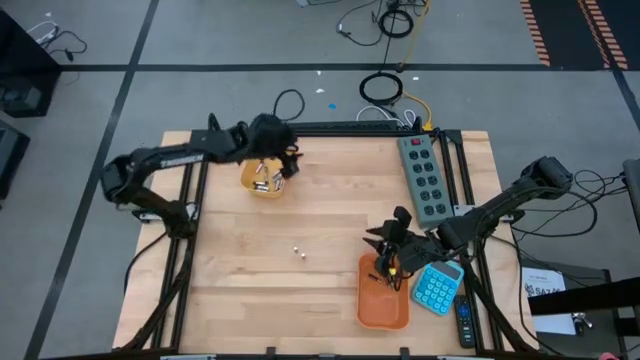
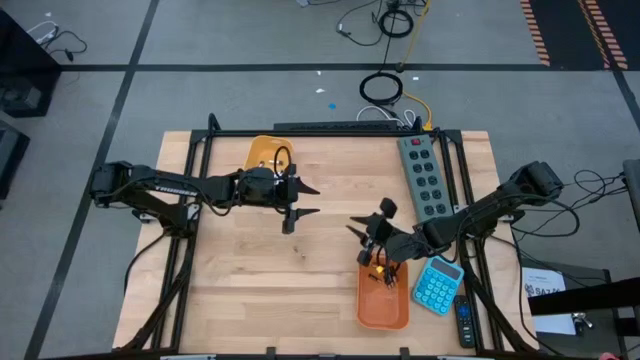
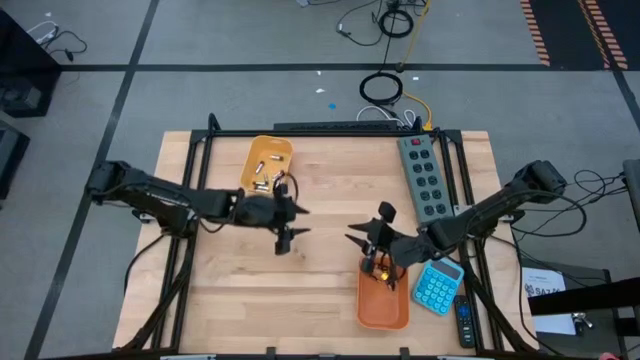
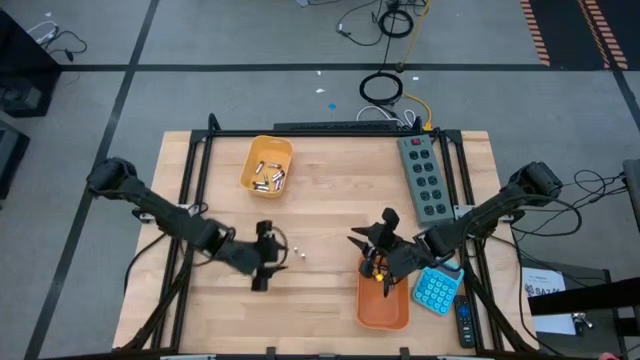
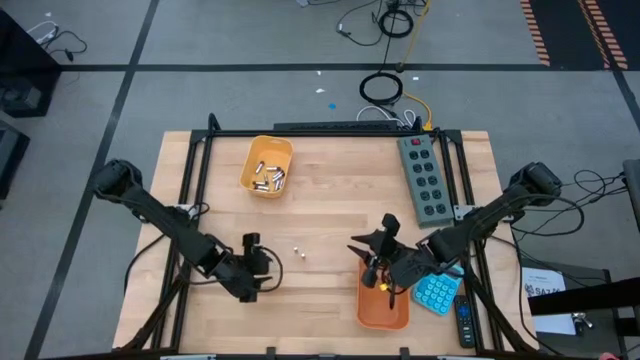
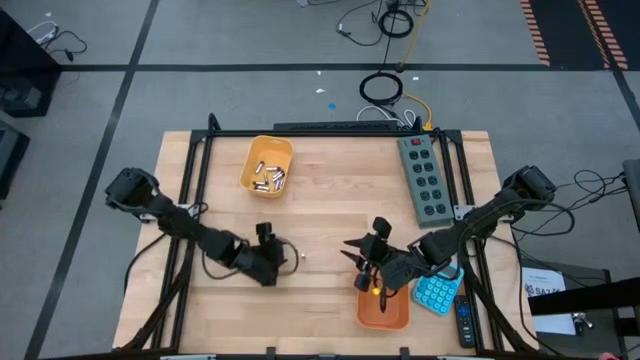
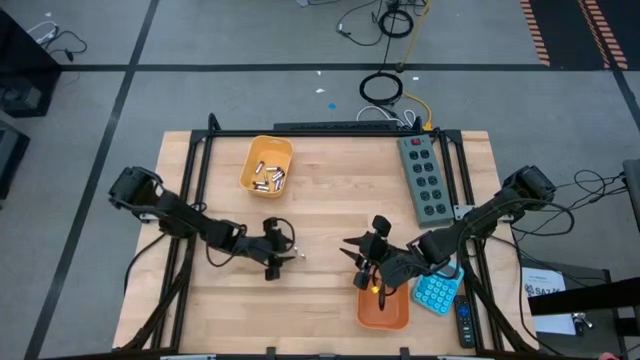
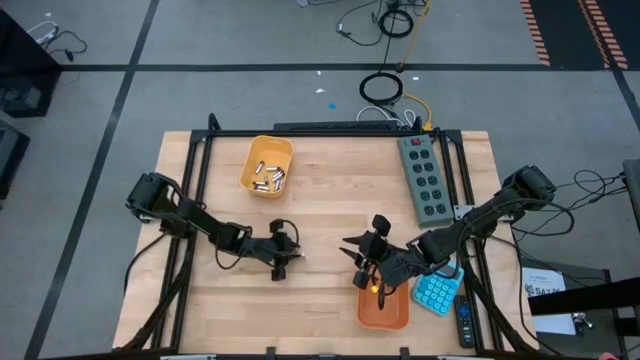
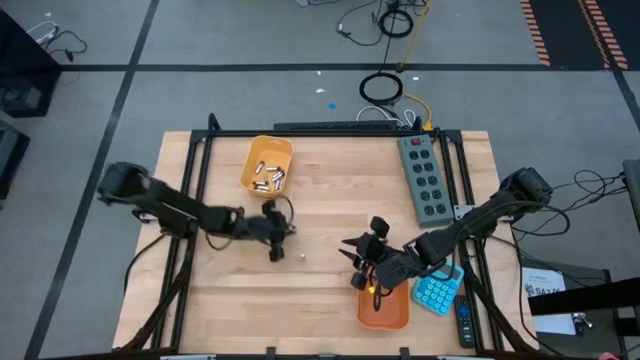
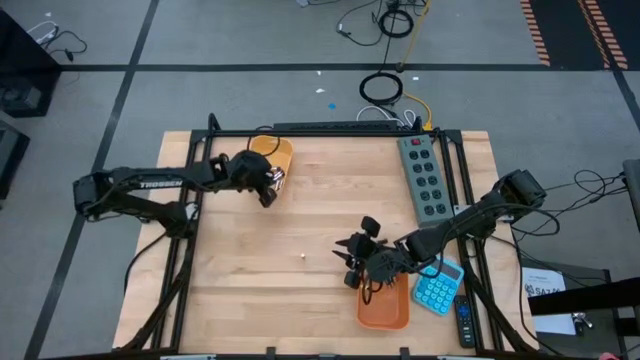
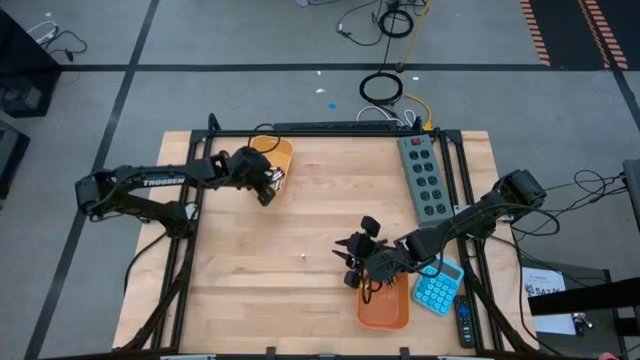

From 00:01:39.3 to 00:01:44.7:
Task: Sort batteries
Put the silver battery into the yellow bin

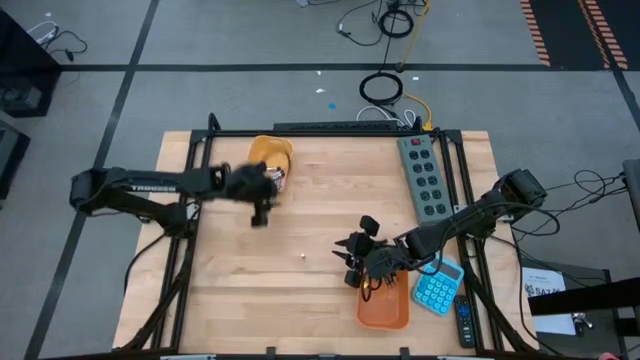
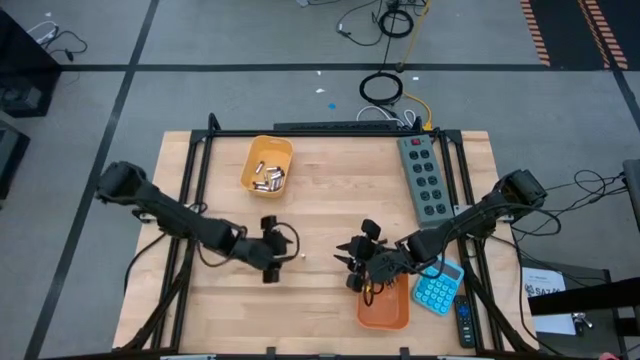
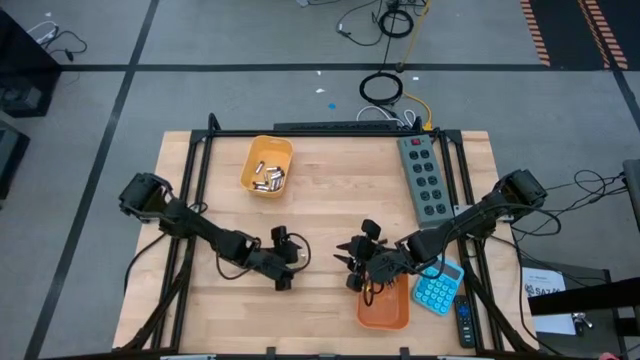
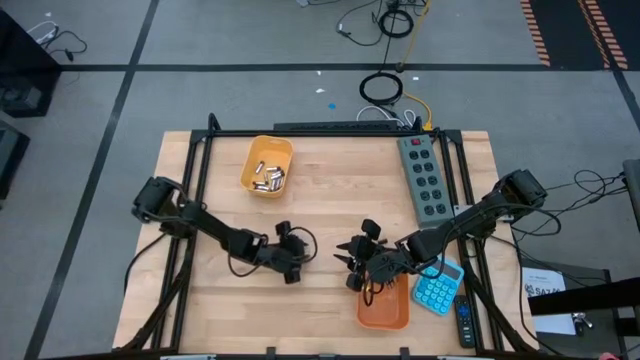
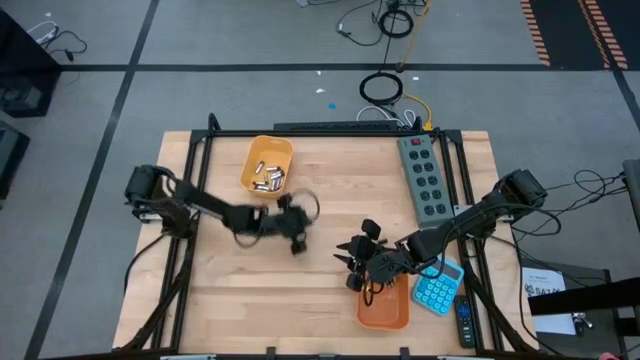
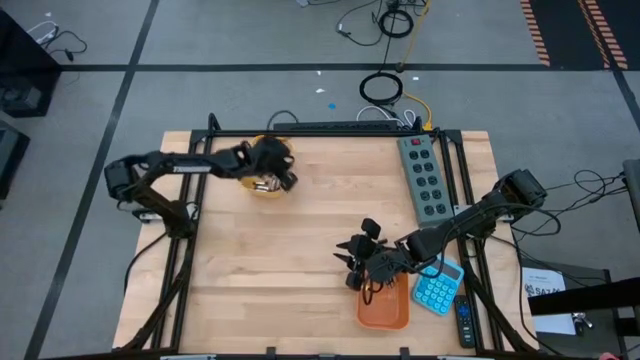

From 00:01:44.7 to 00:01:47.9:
Put the silver battery into the yellow bin

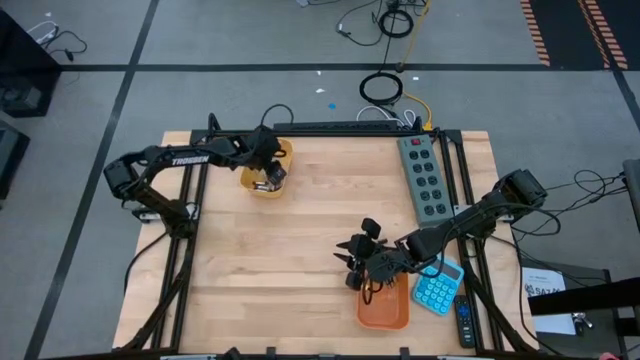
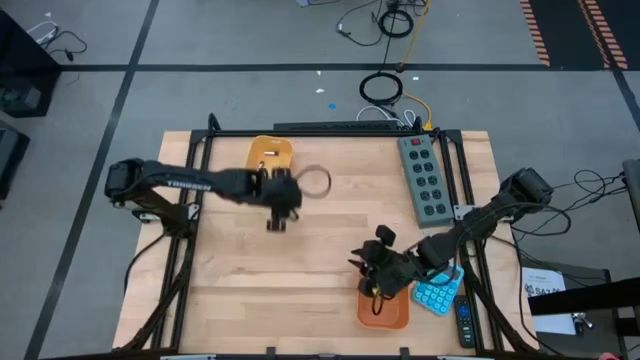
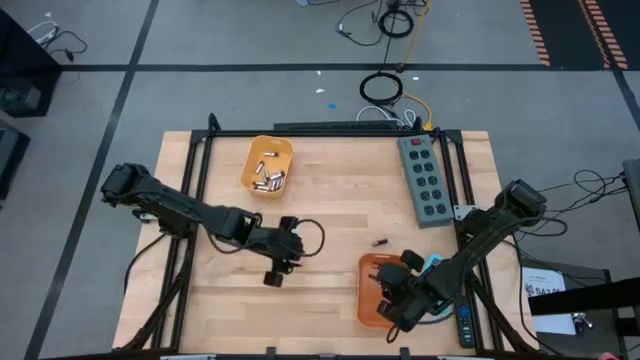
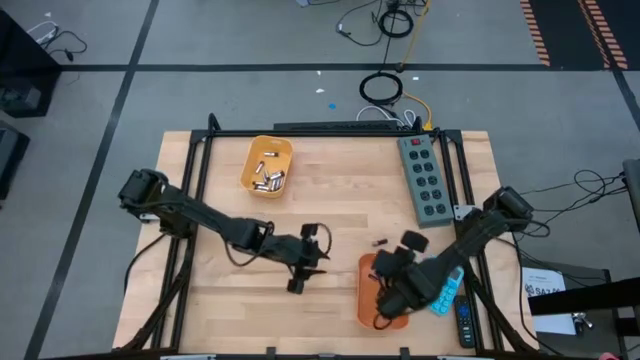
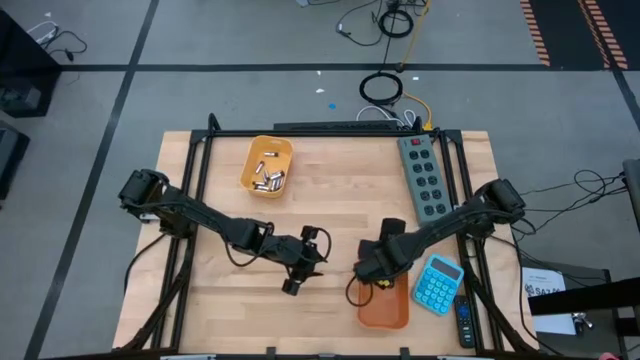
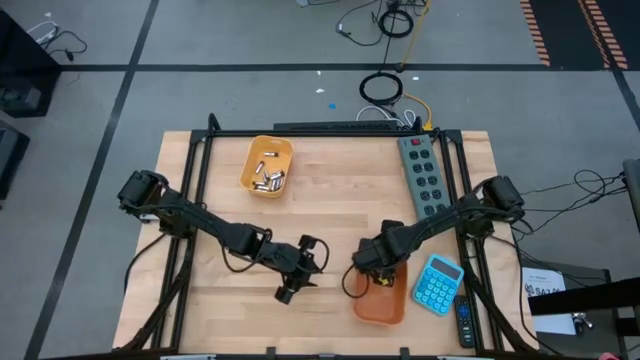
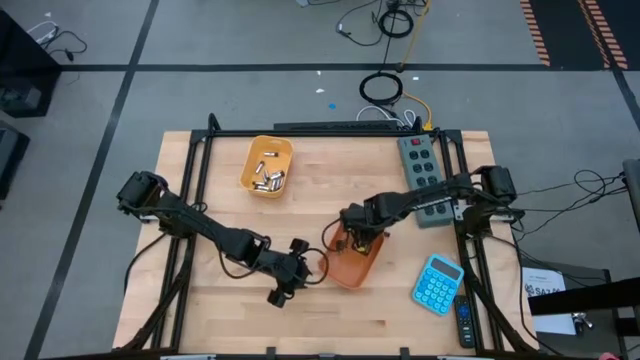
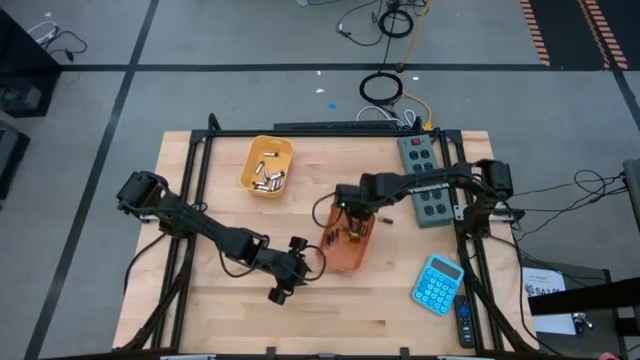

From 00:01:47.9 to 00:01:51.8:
Move the orange bin to the center of the table

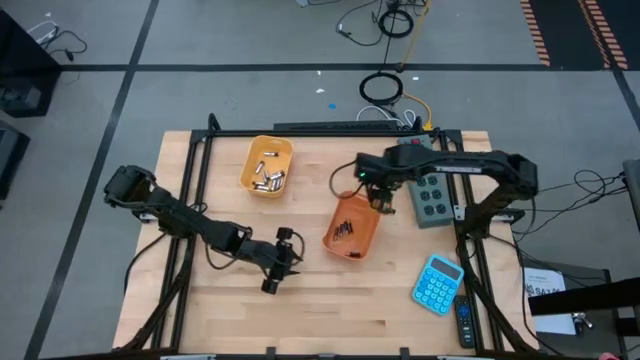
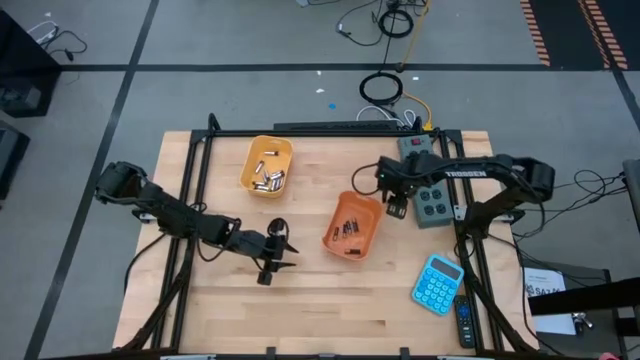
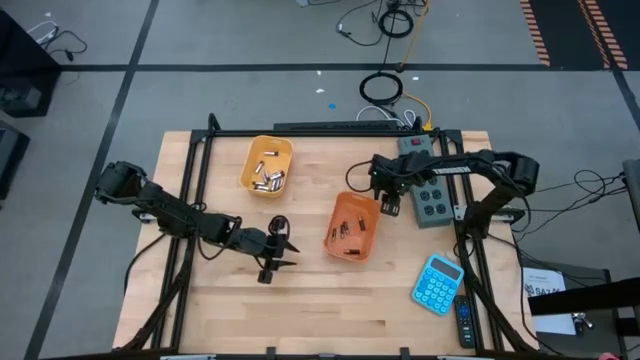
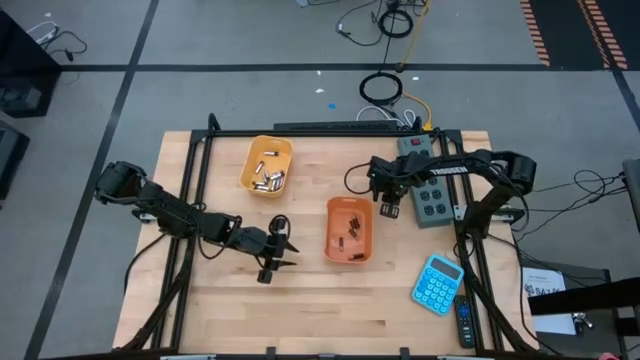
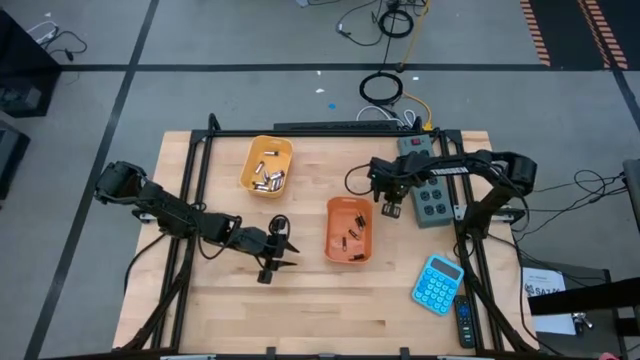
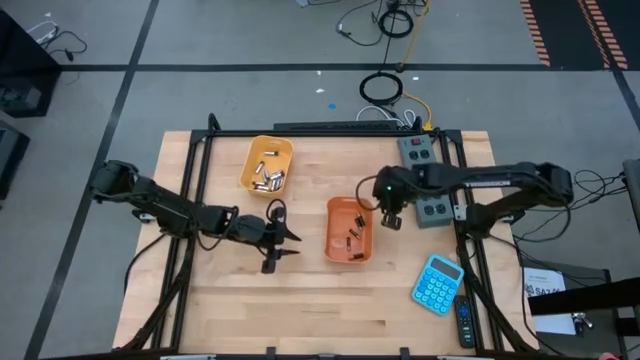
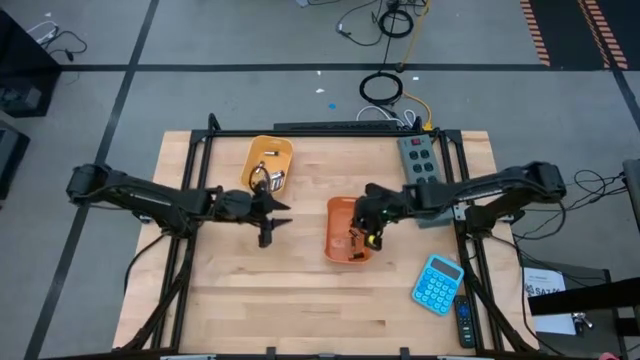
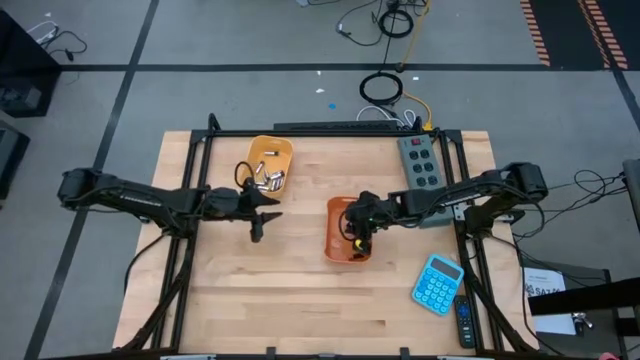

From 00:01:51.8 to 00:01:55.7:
Put the black battery into the orange bin

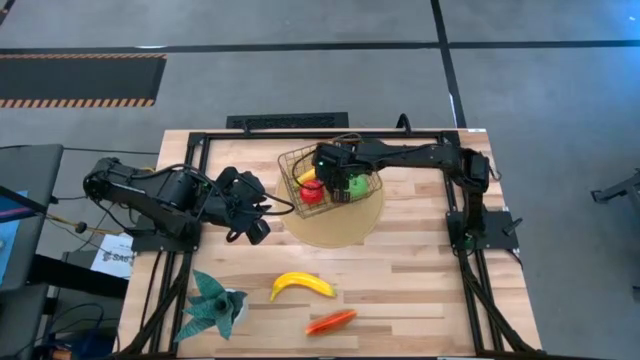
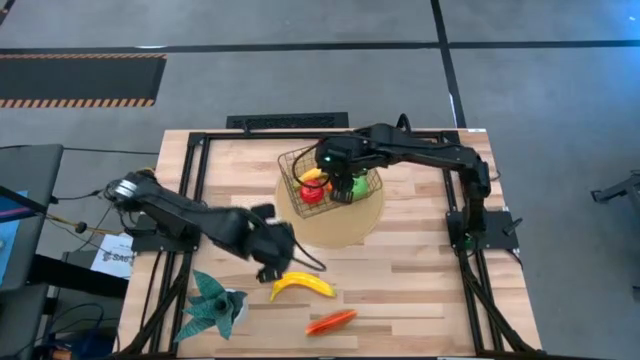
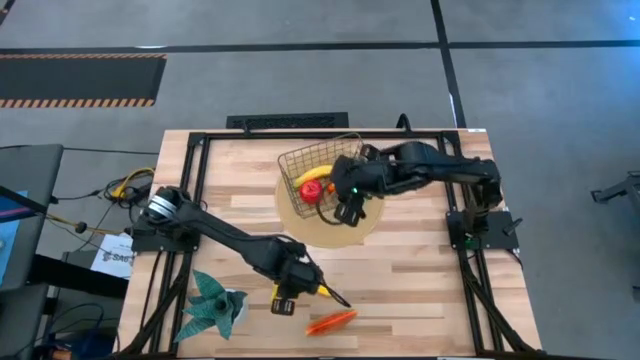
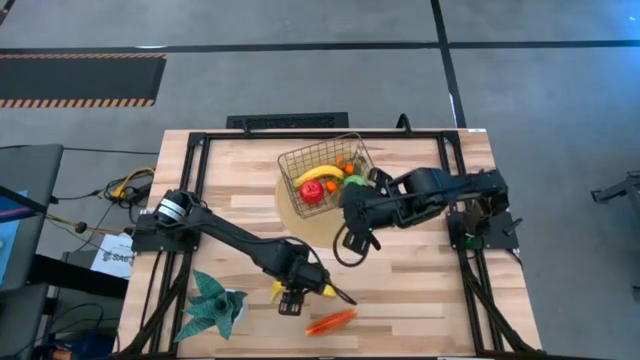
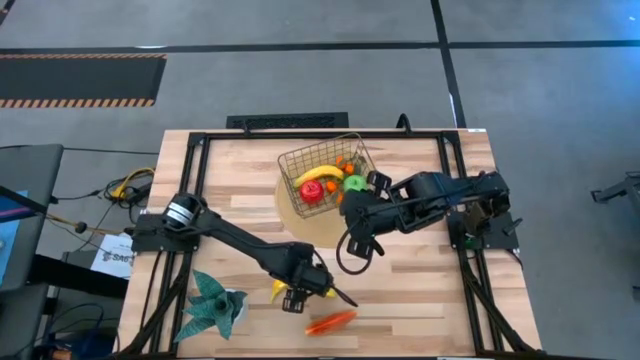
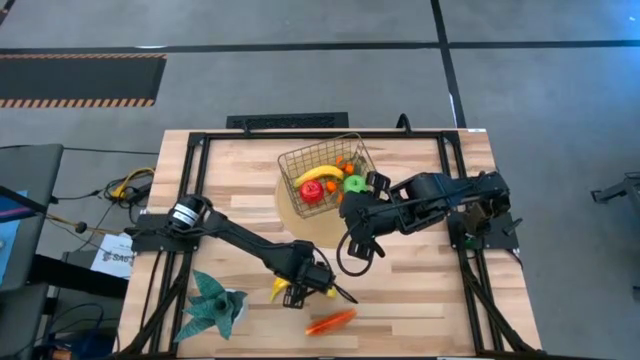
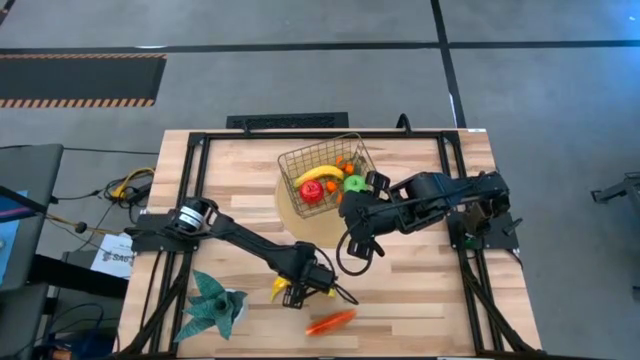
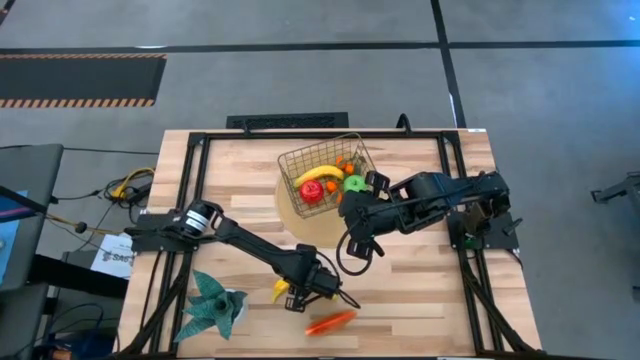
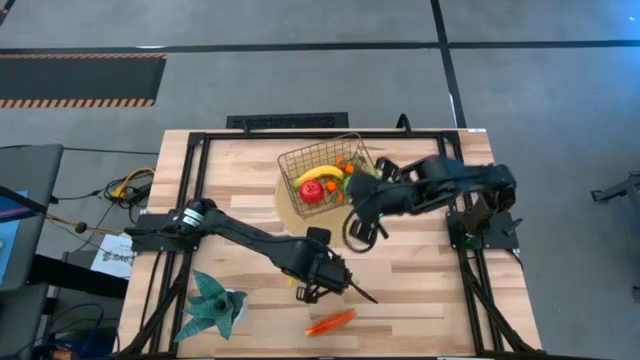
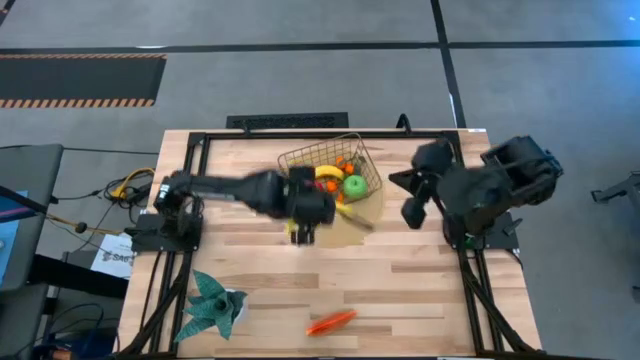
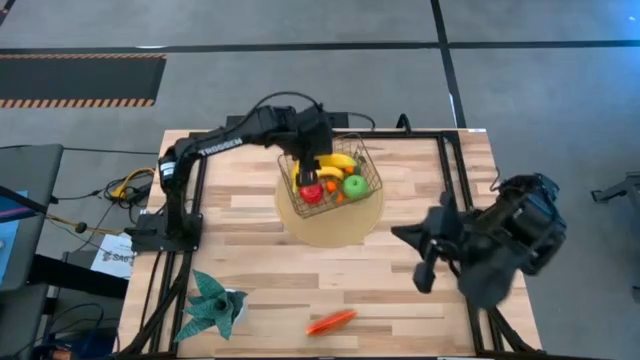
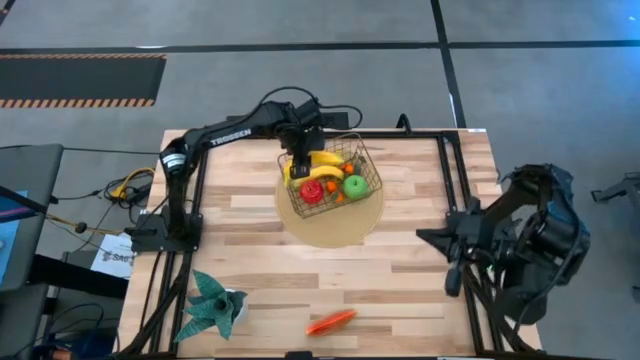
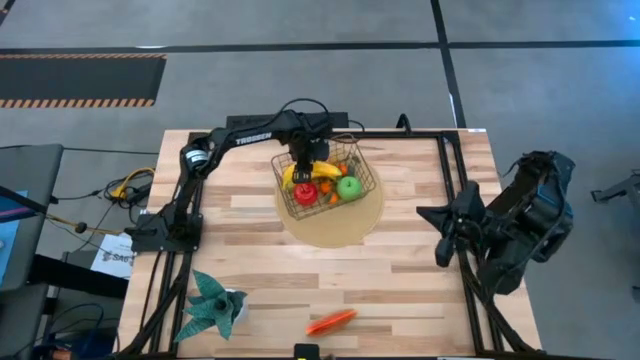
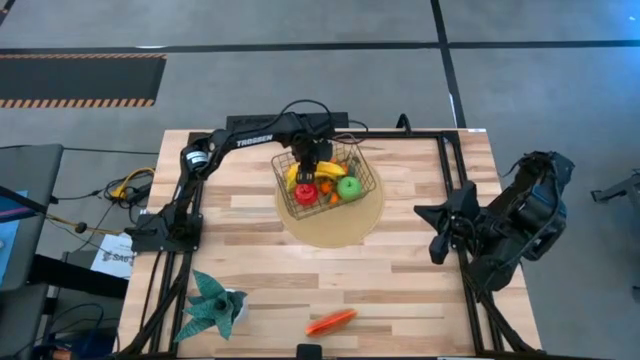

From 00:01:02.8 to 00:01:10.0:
Task: Build produce basket
Put the banana into the basket
